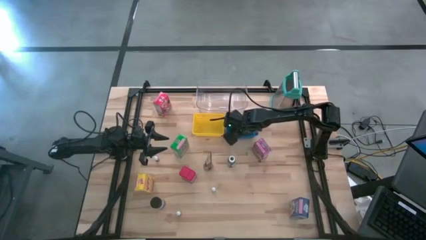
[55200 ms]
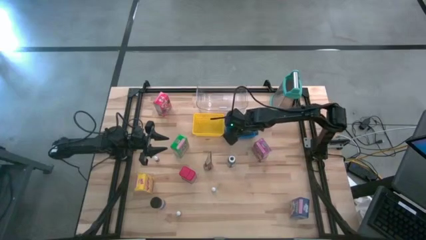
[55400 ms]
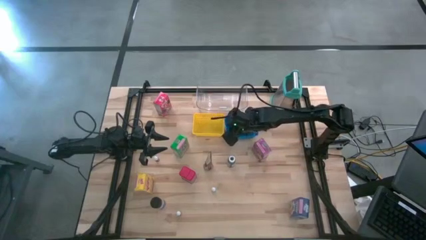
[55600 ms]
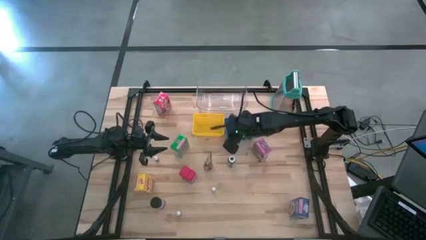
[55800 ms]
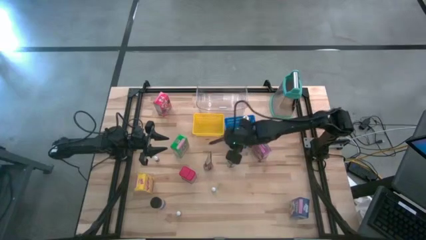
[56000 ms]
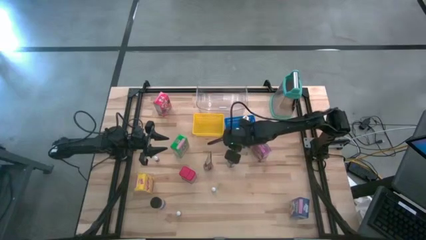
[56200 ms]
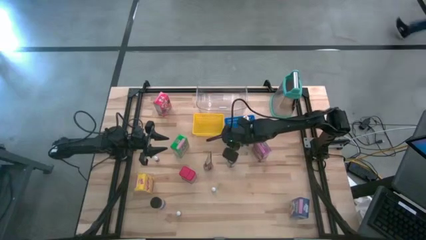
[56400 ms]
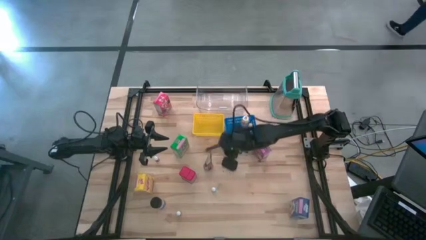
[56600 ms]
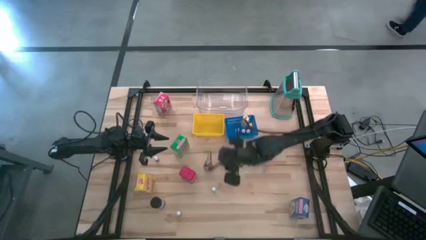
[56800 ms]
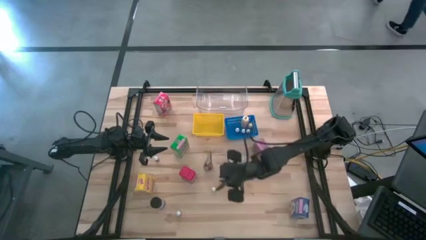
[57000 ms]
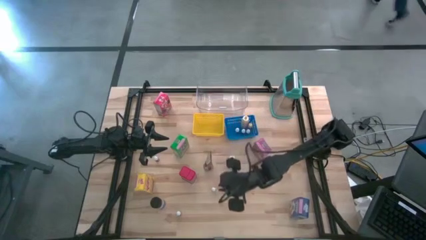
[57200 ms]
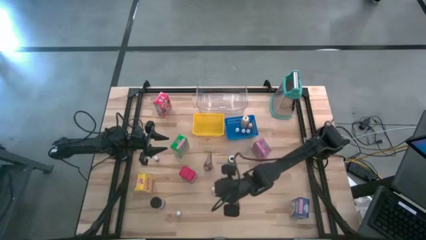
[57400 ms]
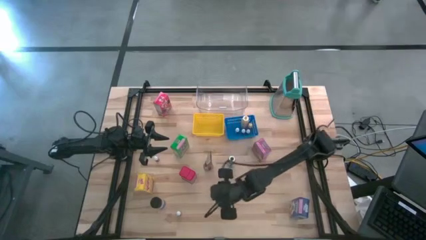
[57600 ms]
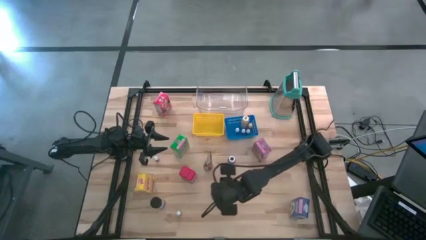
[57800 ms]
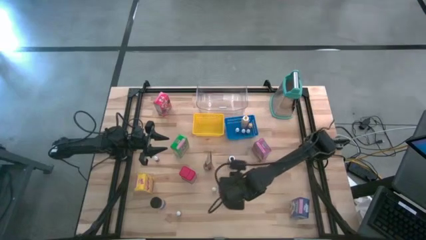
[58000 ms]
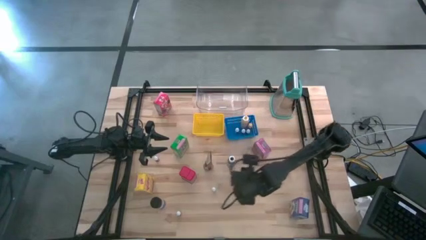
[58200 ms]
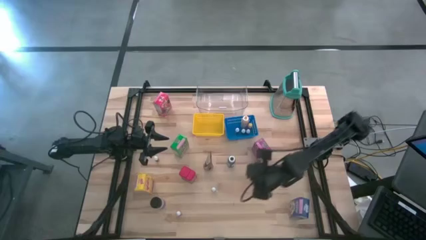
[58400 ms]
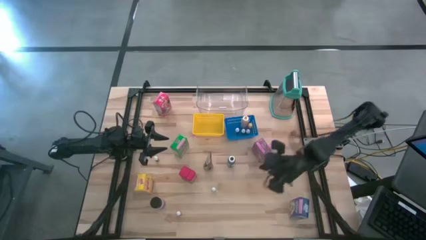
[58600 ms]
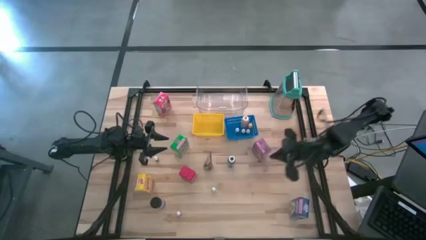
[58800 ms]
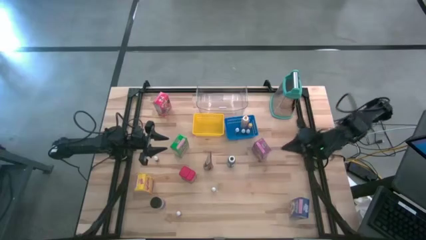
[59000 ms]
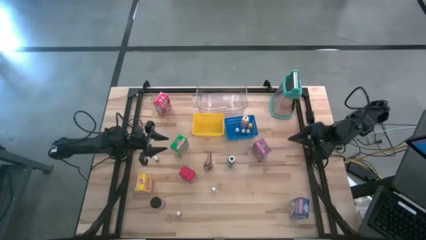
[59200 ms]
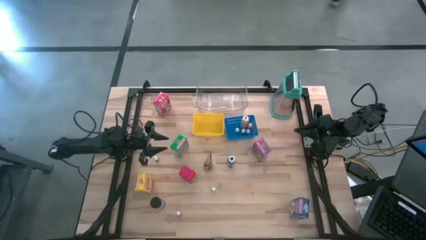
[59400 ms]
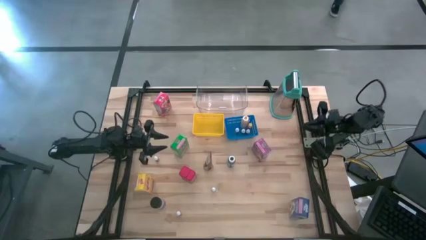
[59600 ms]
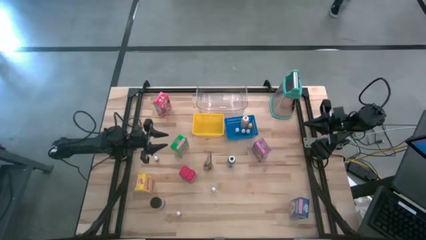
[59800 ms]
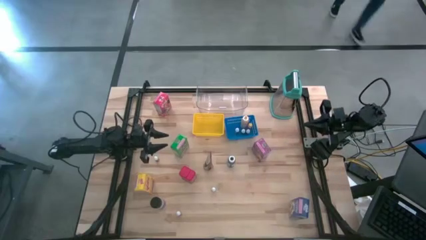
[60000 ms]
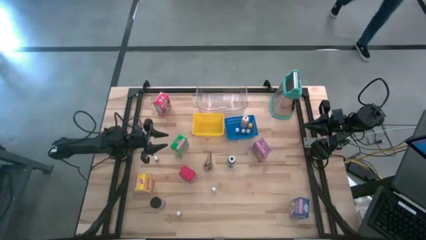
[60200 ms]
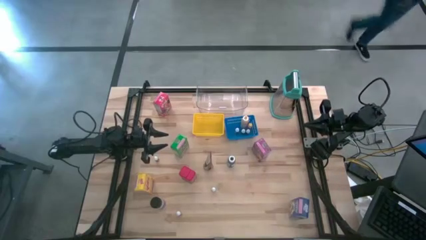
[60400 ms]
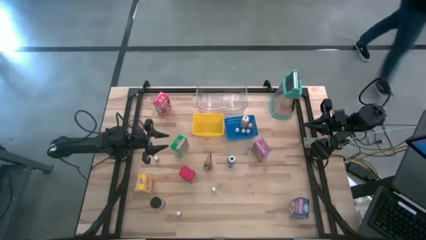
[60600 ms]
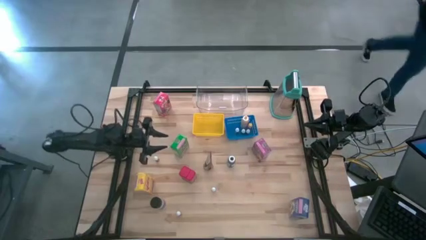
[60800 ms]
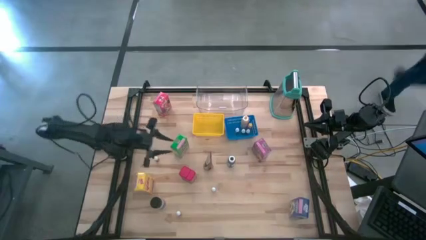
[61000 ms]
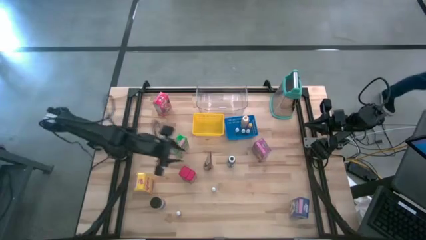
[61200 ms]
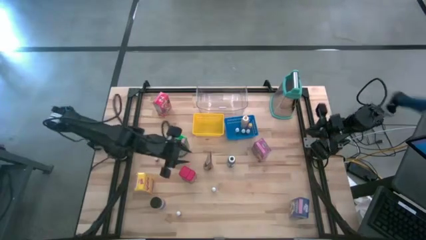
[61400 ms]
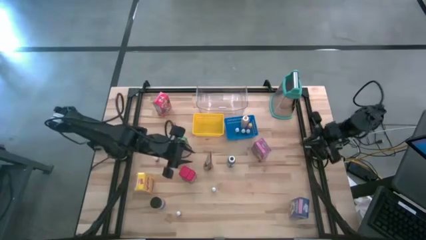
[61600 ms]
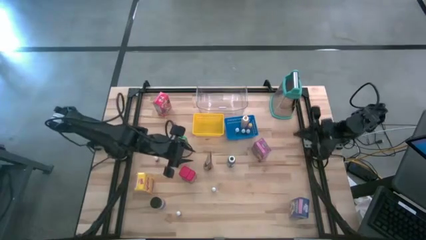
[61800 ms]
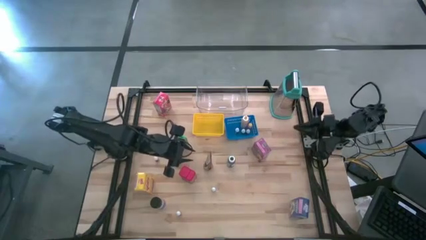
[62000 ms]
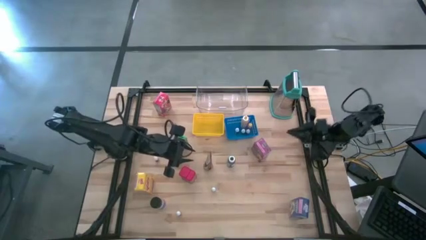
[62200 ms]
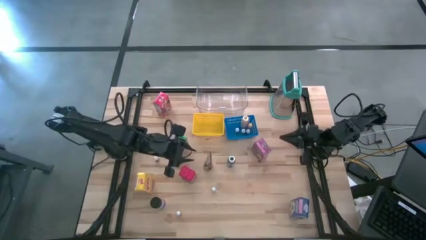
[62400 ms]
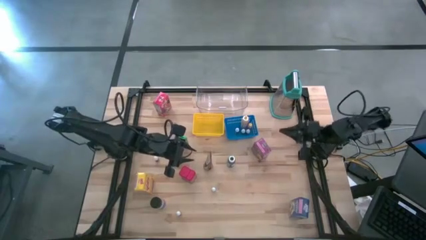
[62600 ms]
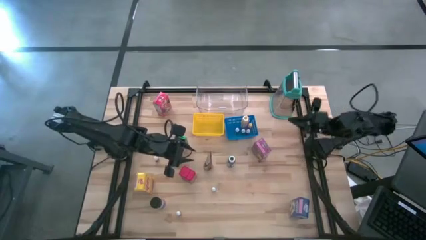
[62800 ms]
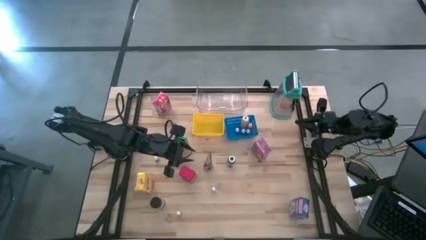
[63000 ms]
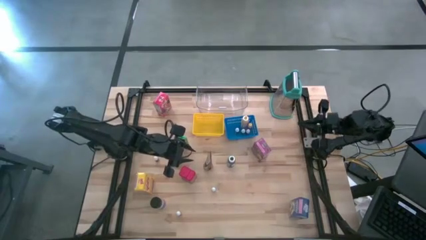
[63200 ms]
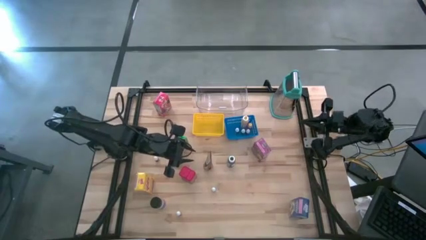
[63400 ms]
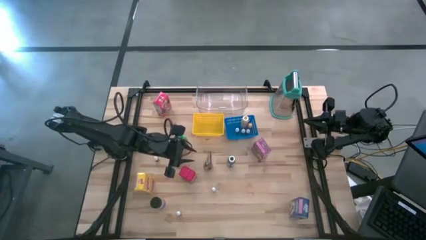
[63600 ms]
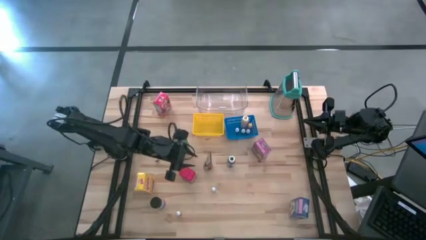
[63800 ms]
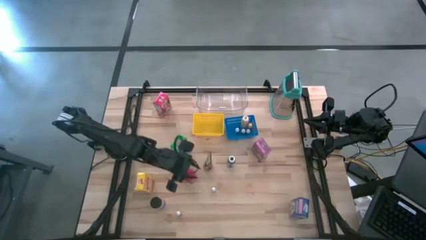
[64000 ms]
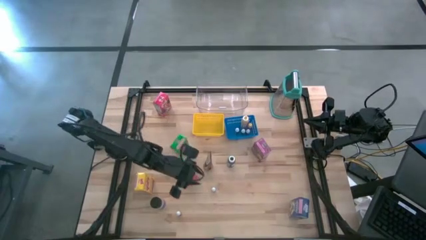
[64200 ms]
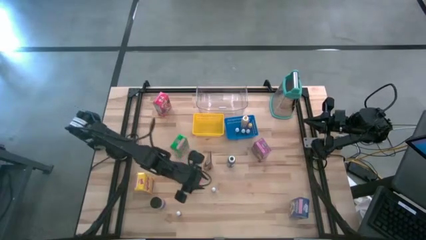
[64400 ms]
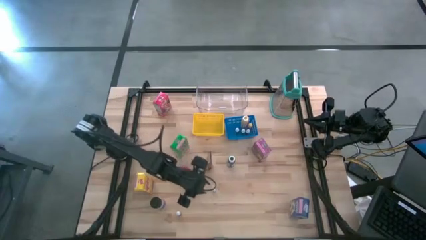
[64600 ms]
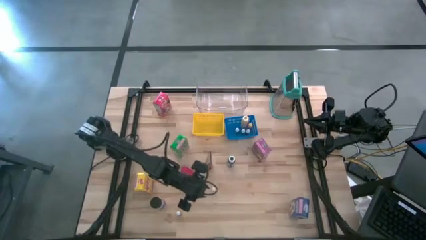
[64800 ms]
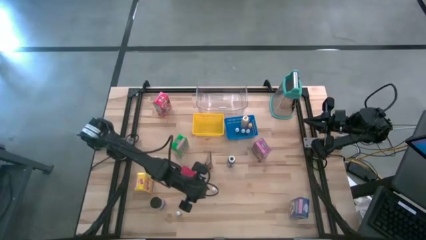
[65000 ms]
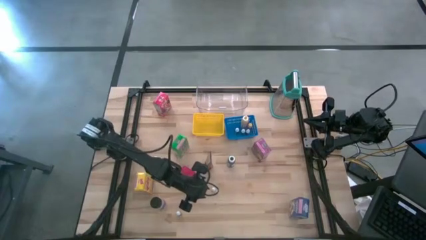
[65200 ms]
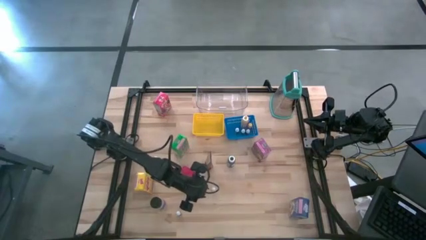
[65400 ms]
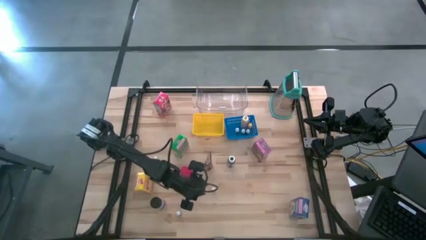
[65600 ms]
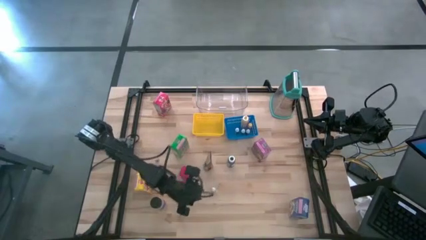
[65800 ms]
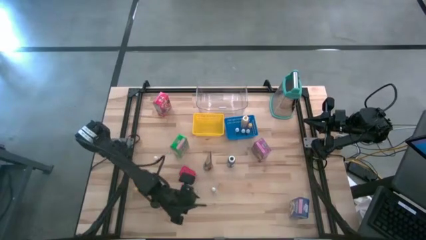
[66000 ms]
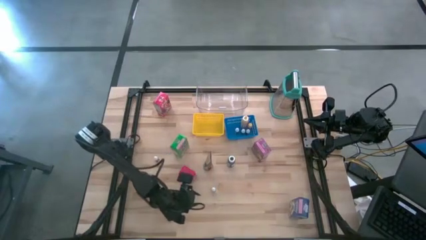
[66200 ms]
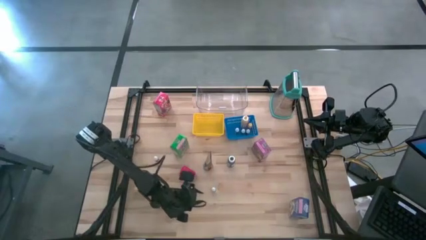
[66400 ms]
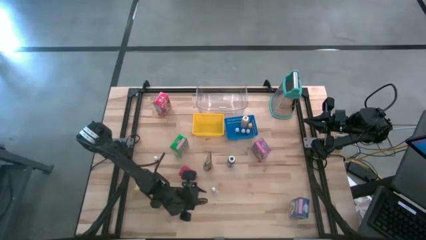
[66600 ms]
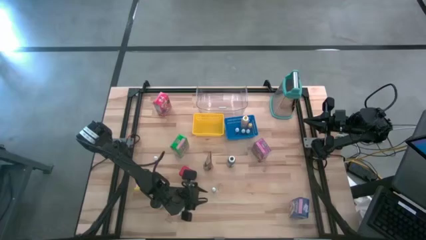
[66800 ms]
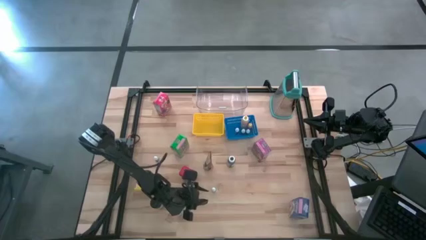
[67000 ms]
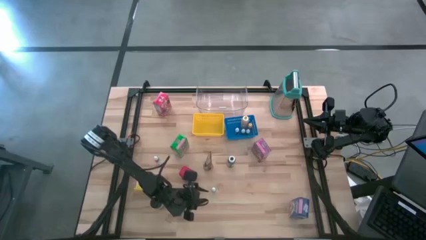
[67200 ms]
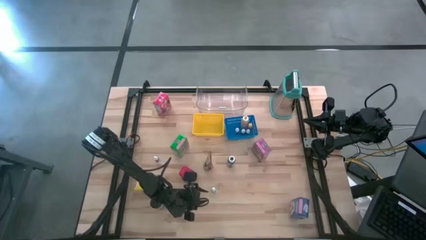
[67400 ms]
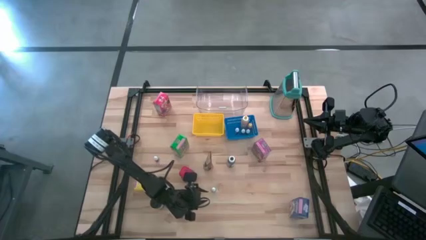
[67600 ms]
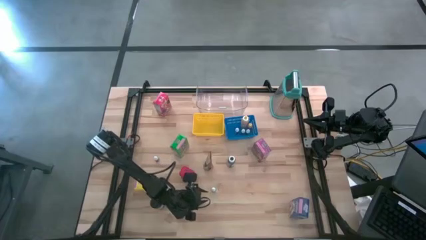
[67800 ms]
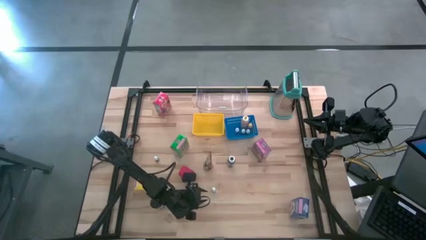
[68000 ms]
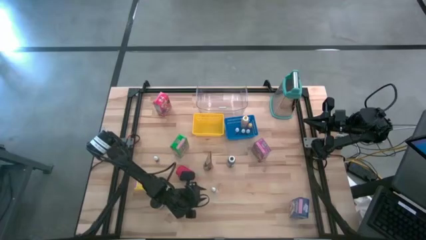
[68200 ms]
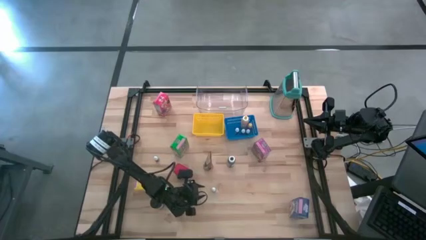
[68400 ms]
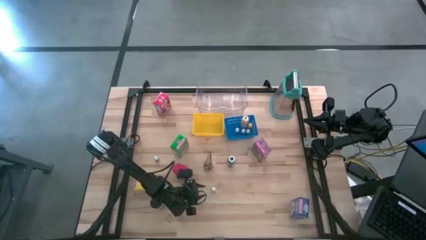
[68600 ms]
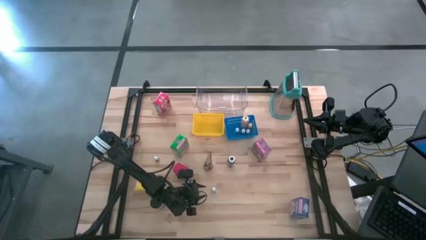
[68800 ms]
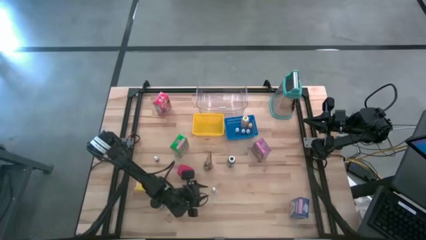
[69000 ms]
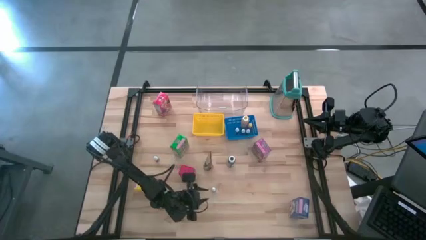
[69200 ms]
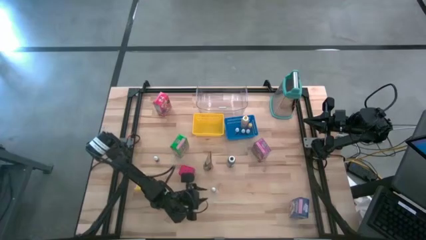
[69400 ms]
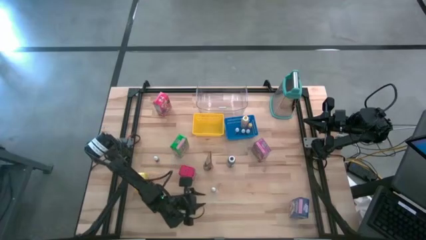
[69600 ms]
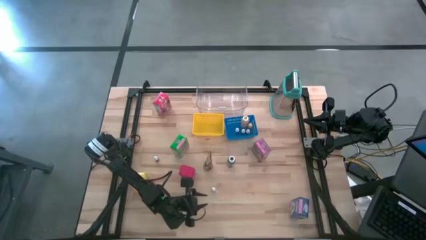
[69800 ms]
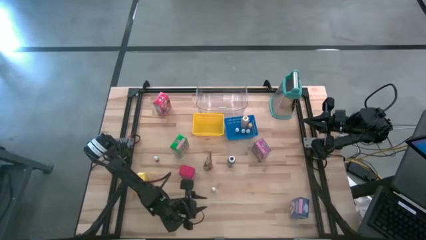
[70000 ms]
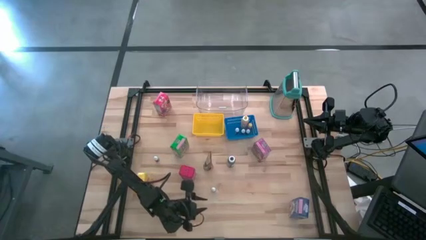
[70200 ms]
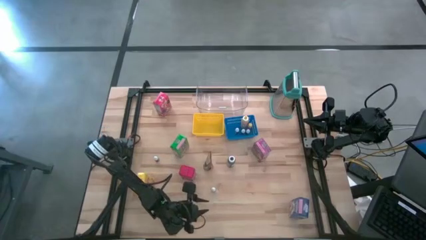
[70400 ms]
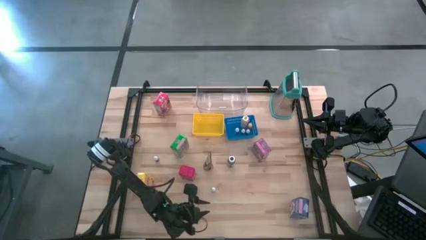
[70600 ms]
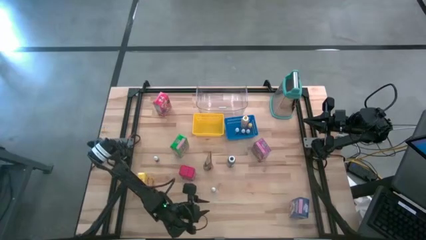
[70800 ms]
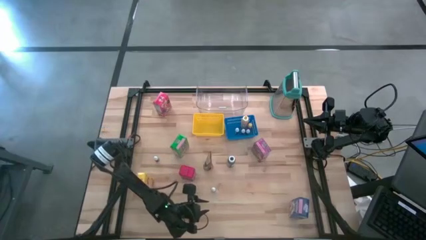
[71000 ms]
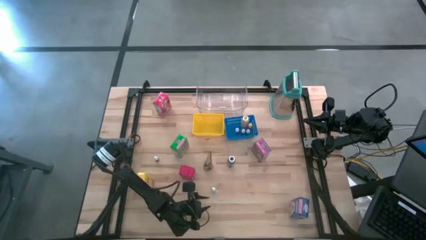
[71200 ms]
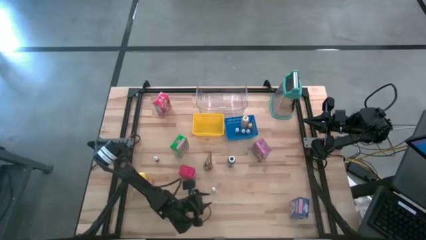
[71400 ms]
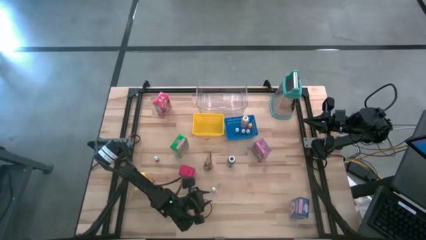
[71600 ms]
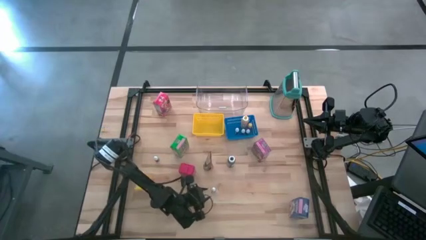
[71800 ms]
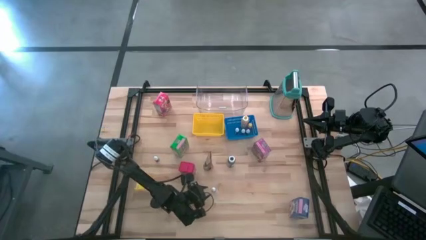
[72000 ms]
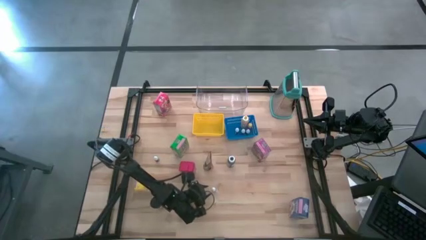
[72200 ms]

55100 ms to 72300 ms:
Task: Pick & Place Kitchen Items
Move the red food coloring bottle
